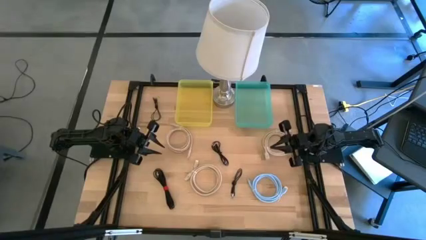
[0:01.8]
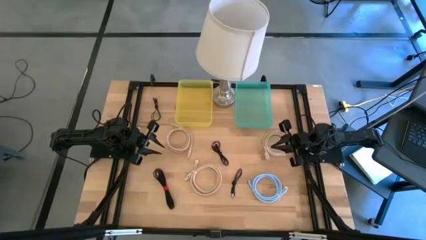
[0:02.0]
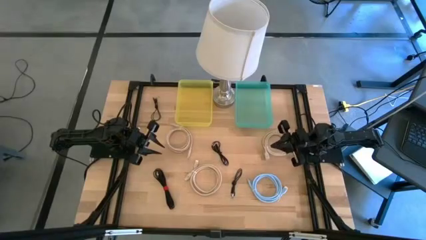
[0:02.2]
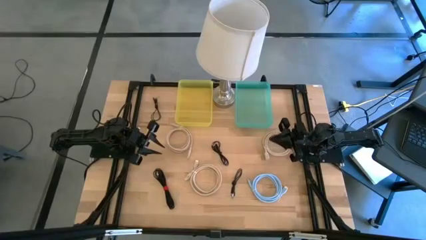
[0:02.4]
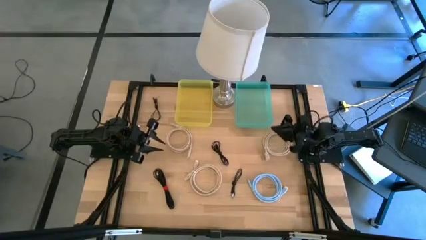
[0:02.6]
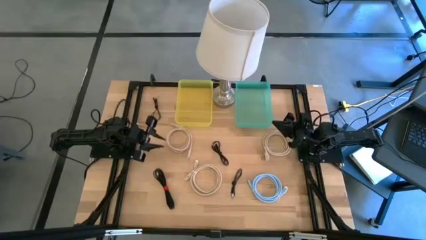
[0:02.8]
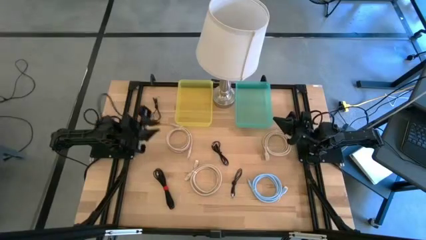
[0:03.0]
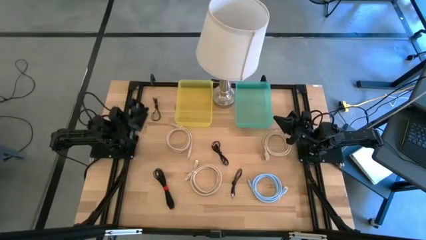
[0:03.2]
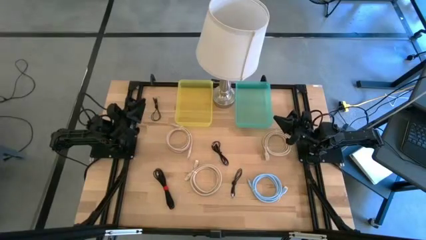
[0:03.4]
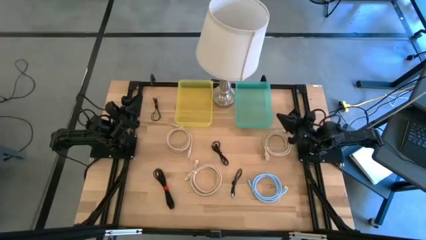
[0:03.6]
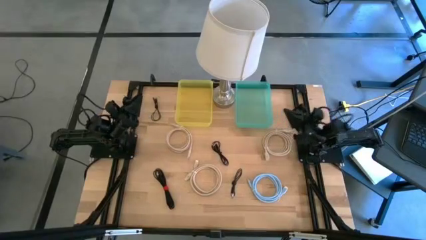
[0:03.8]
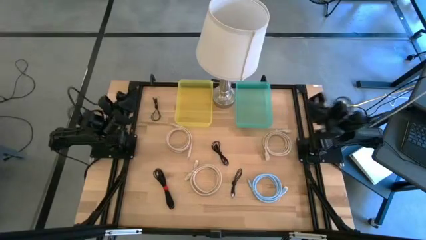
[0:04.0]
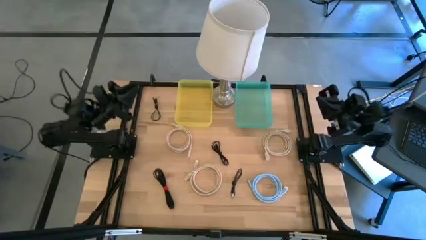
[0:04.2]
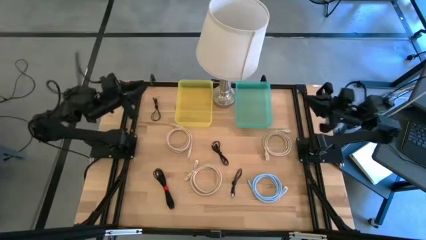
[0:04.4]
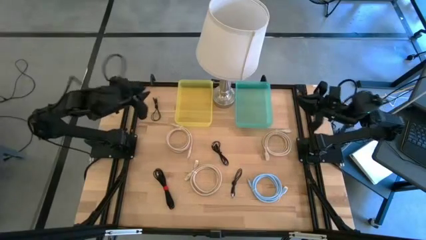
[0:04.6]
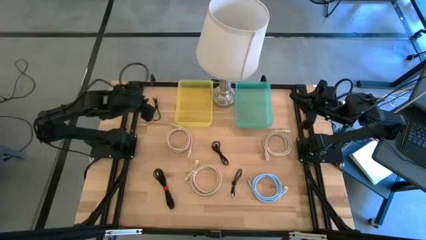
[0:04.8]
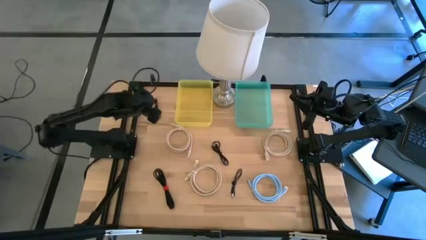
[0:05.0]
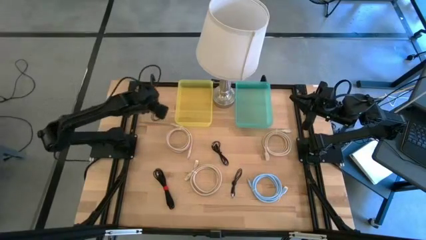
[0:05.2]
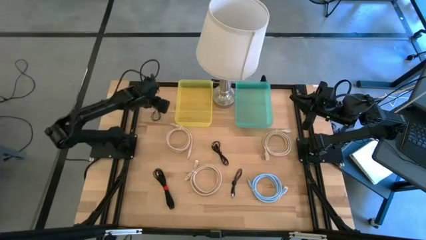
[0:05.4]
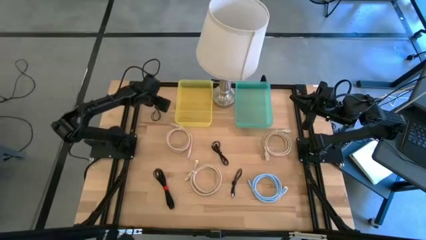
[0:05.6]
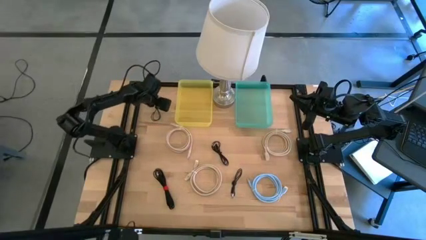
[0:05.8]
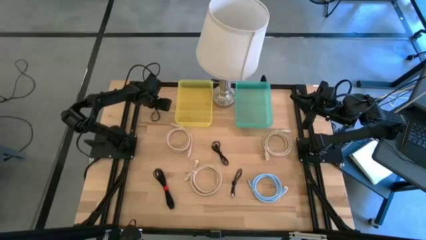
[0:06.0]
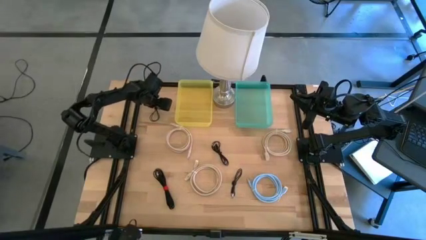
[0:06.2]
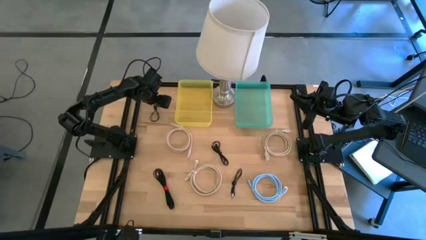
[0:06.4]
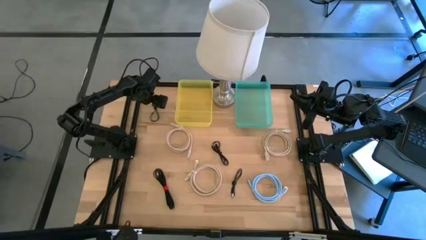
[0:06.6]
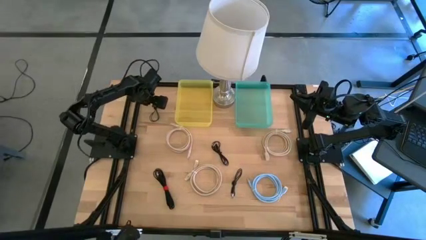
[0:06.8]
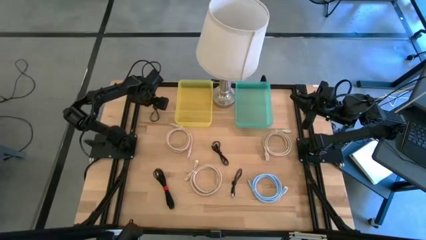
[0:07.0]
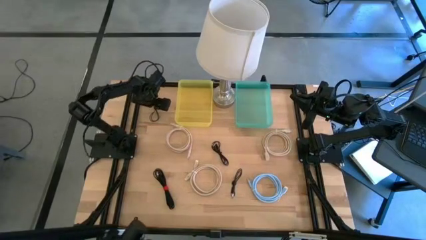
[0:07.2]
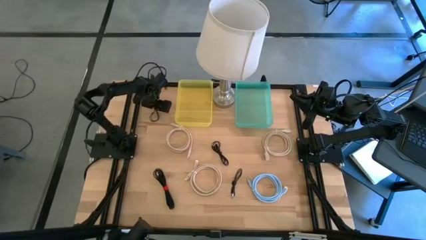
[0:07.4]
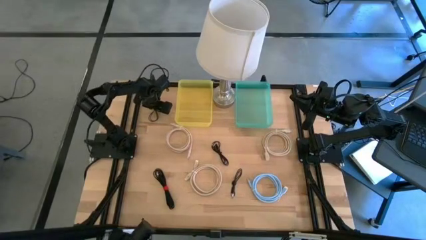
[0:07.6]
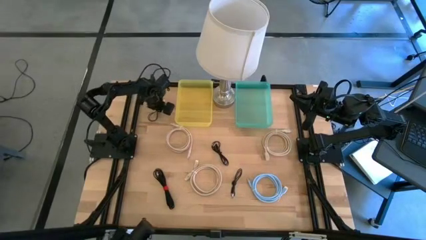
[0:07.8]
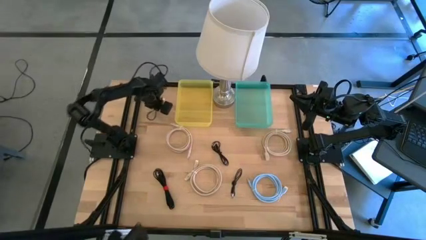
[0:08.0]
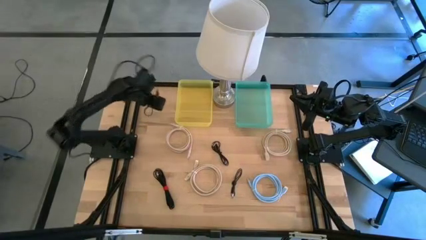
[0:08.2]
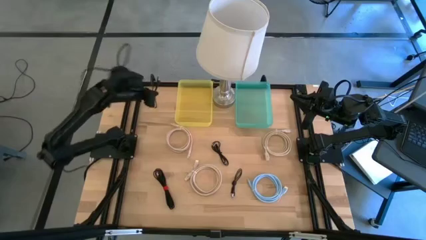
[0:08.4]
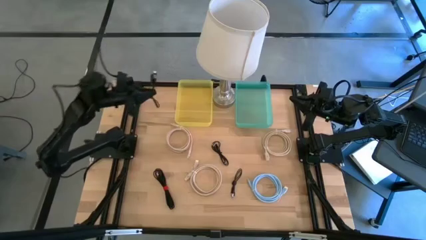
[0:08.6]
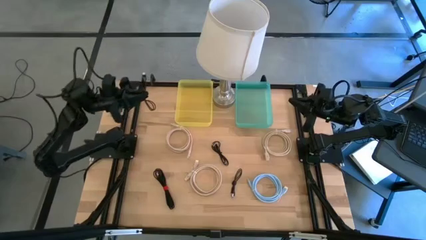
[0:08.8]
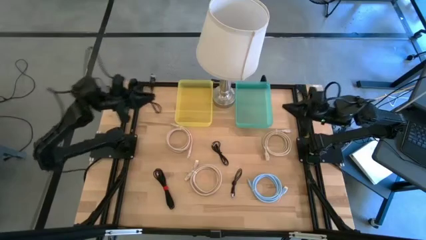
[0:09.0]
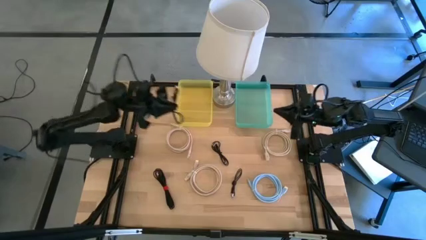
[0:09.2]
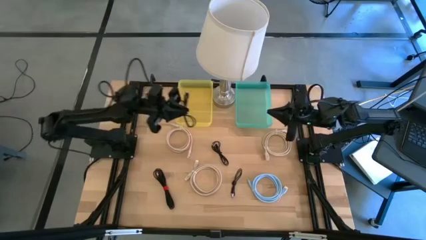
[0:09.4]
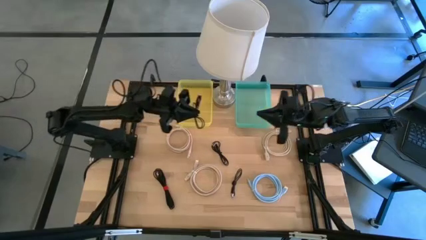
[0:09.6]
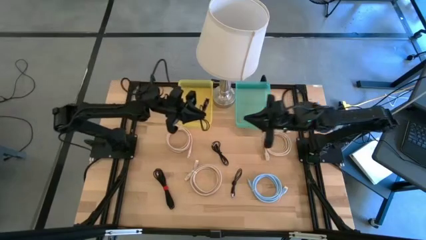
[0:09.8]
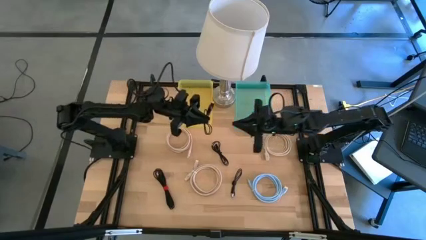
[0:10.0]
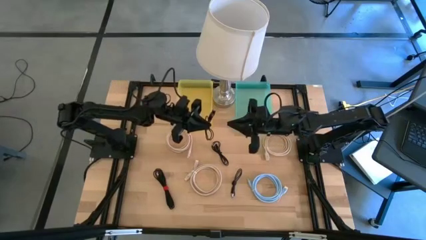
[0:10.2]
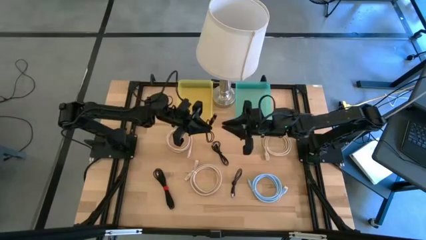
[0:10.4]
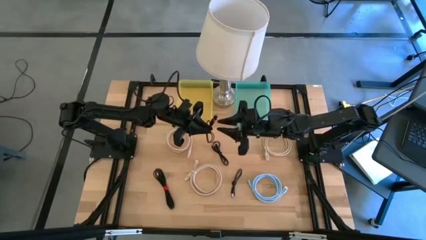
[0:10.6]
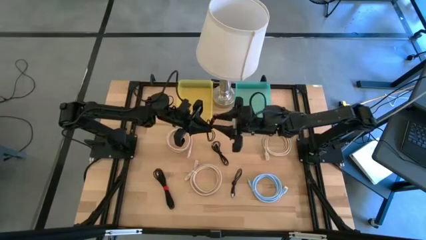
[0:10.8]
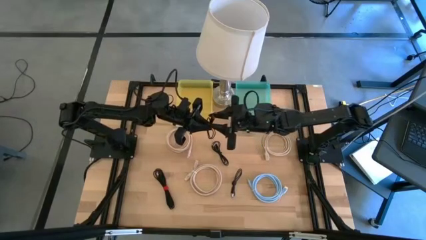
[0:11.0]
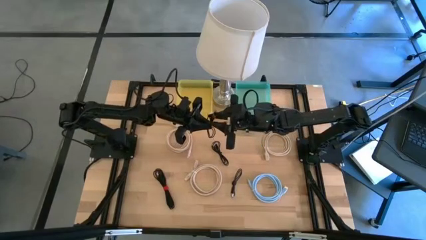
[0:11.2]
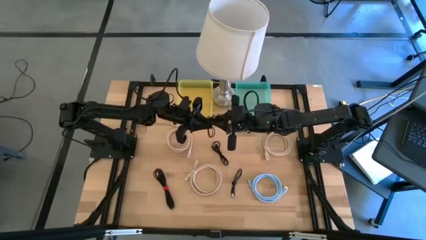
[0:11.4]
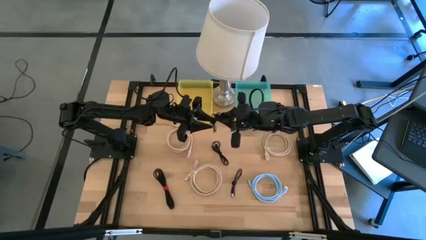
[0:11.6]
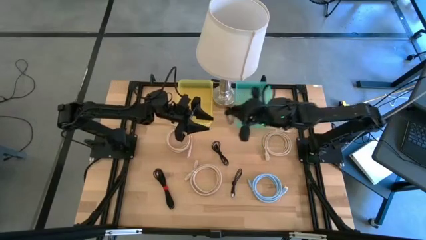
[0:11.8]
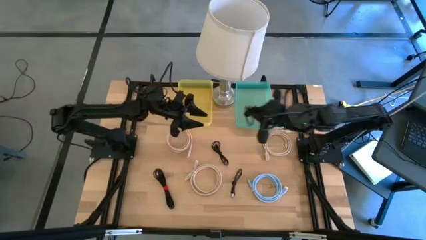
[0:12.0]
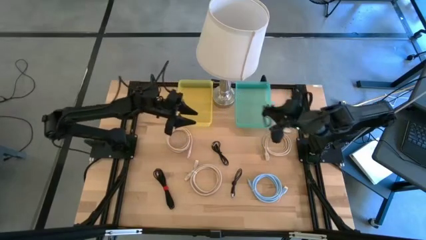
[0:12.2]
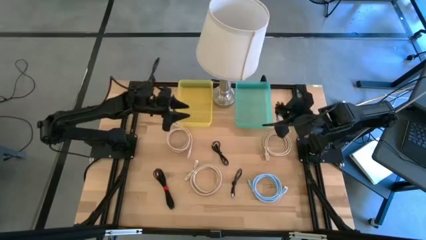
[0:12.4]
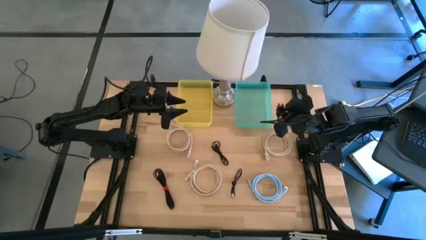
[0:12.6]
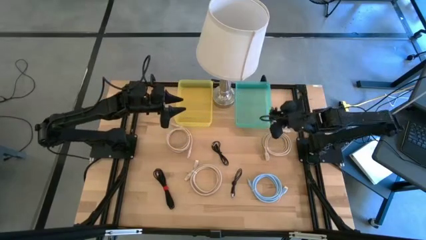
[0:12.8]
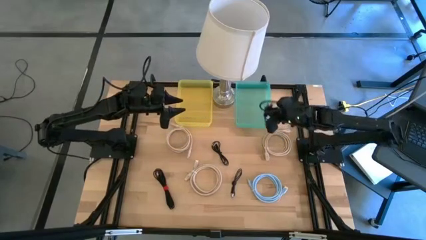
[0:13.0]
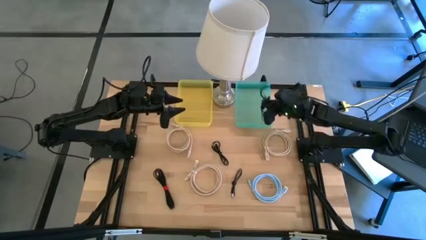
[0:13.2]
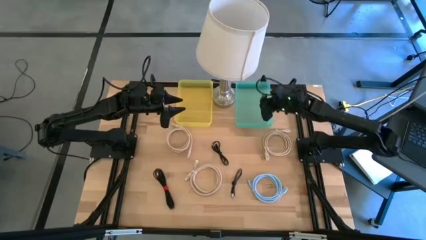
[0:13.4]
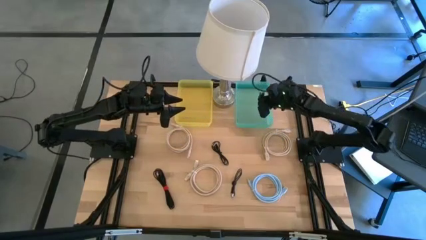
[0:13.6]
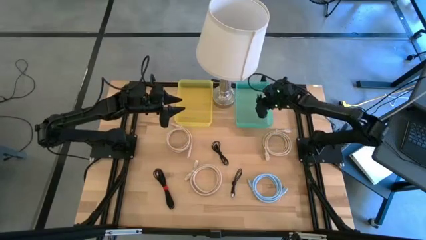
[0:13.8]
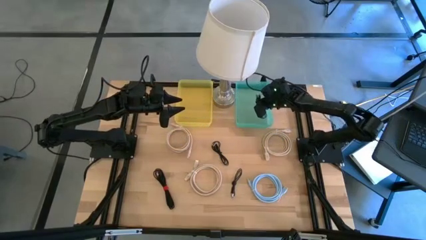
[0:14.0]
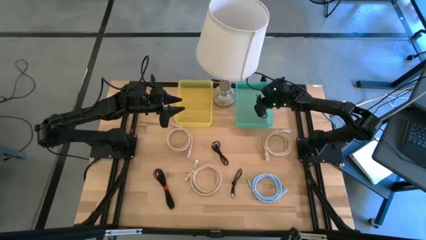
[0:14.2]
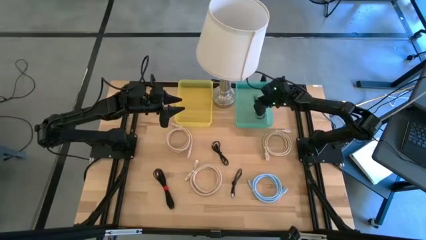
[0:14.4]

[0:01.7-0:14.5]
Put the black USB cable into the blue bin
